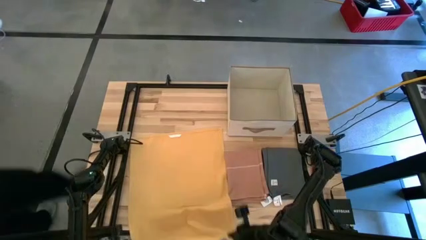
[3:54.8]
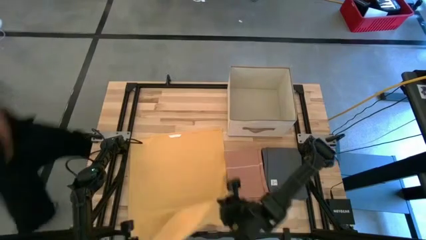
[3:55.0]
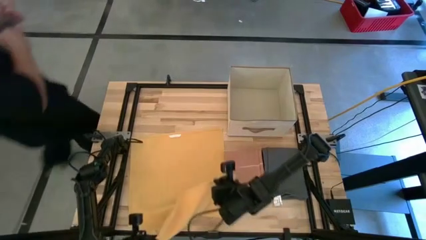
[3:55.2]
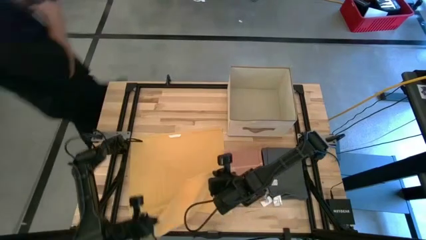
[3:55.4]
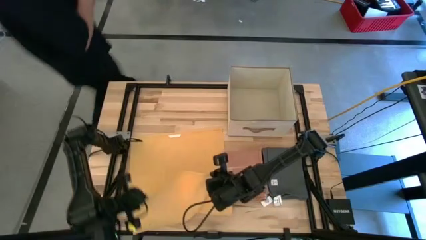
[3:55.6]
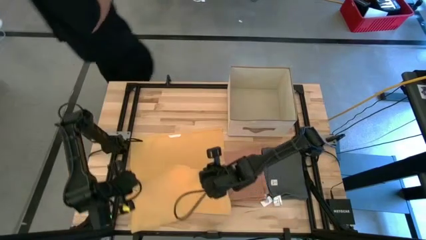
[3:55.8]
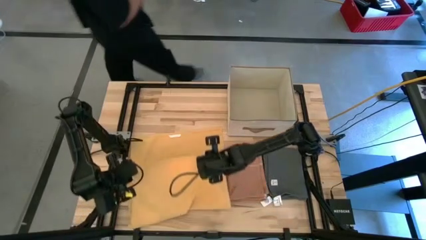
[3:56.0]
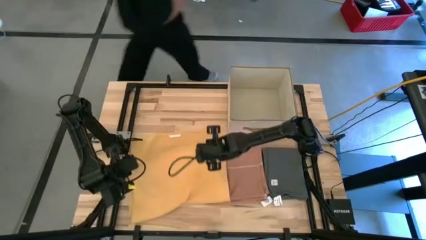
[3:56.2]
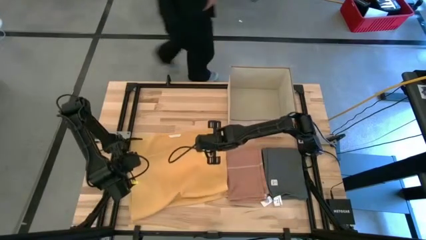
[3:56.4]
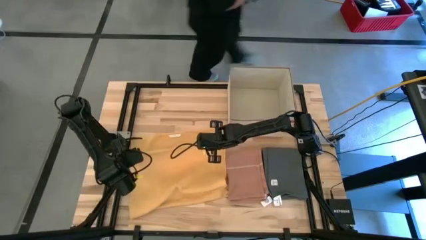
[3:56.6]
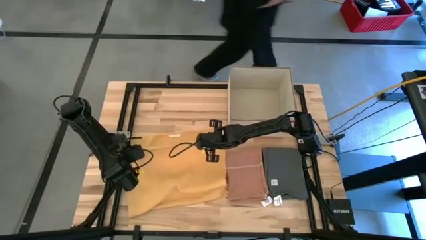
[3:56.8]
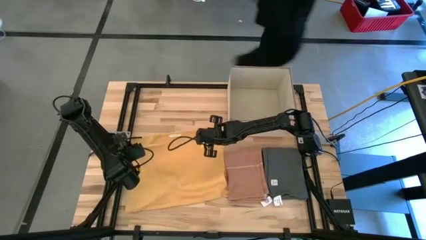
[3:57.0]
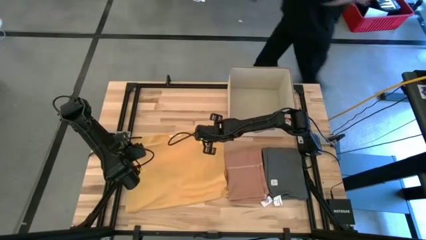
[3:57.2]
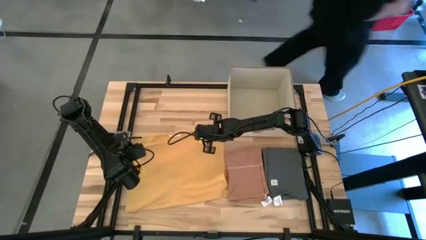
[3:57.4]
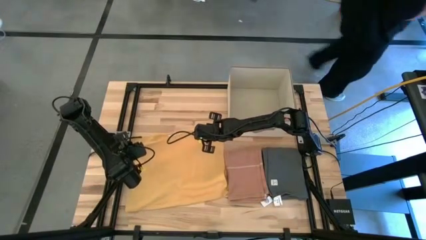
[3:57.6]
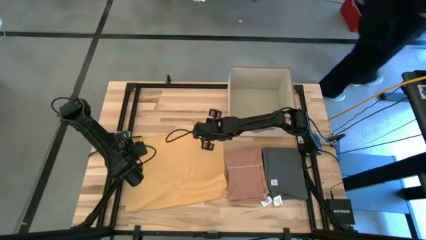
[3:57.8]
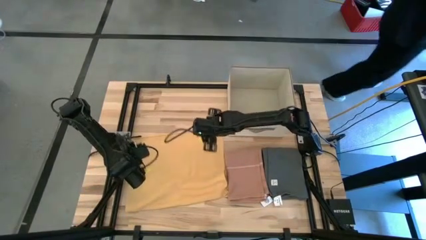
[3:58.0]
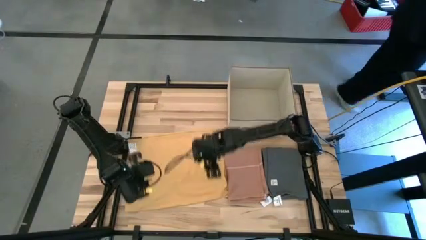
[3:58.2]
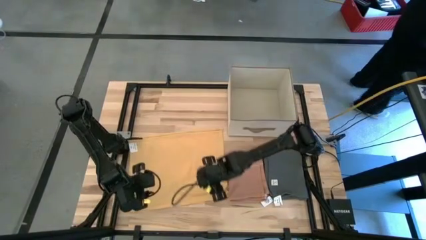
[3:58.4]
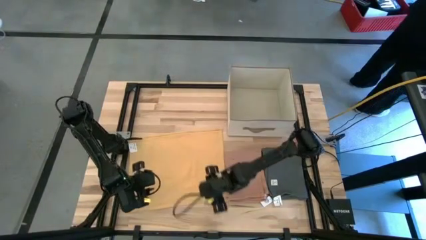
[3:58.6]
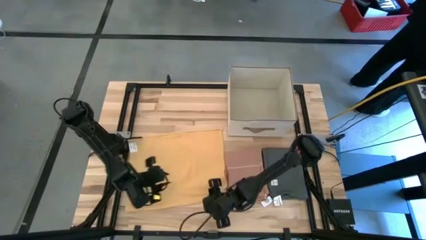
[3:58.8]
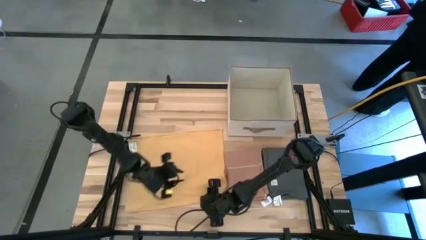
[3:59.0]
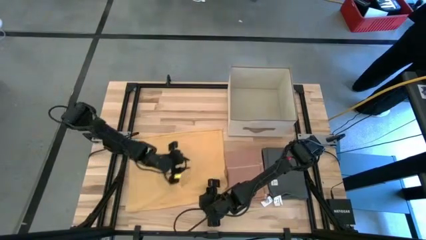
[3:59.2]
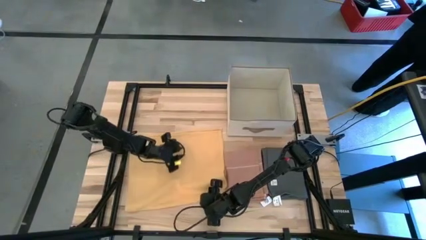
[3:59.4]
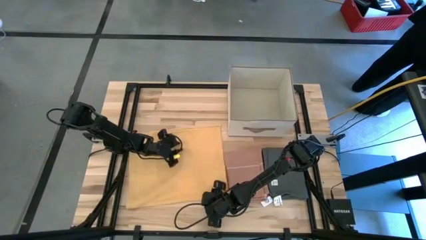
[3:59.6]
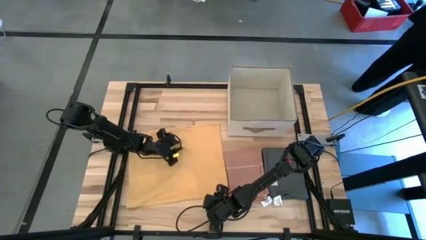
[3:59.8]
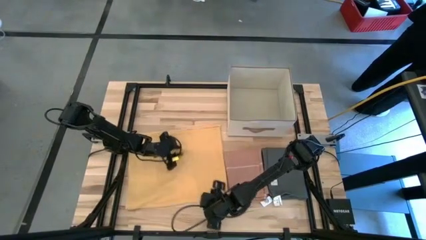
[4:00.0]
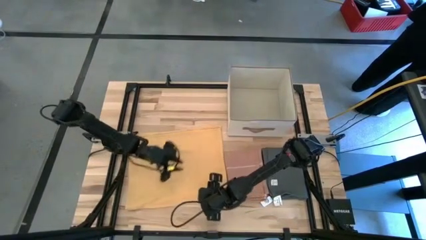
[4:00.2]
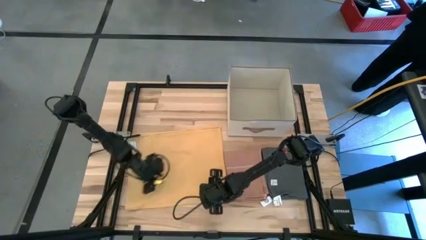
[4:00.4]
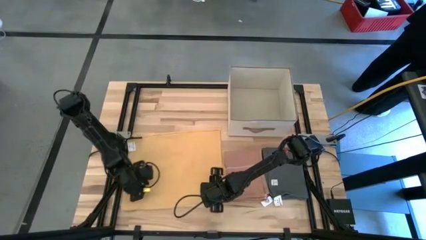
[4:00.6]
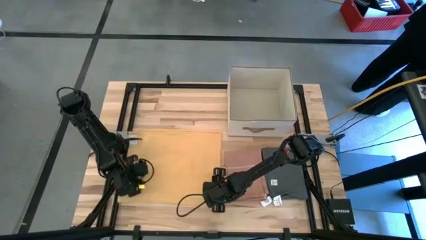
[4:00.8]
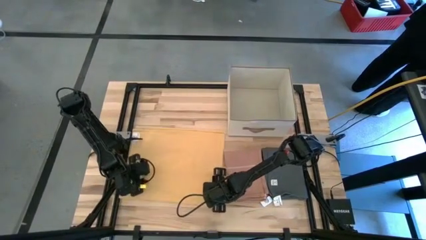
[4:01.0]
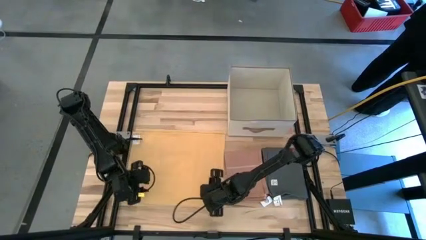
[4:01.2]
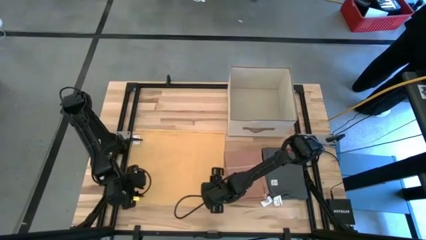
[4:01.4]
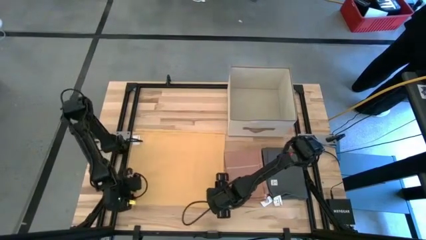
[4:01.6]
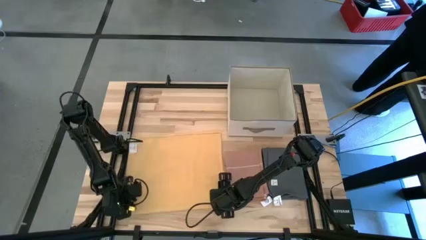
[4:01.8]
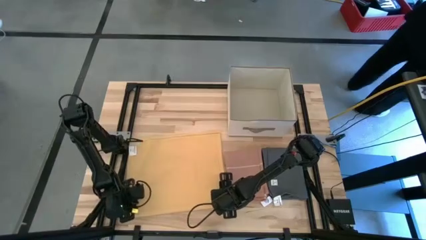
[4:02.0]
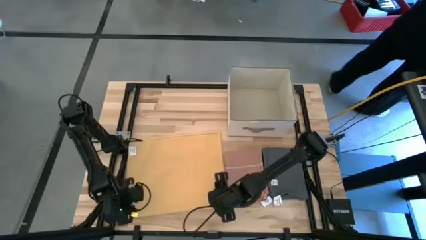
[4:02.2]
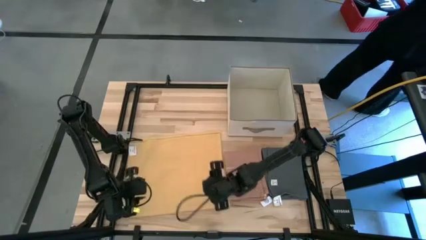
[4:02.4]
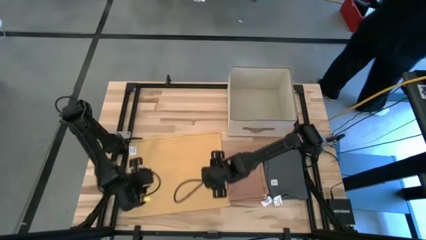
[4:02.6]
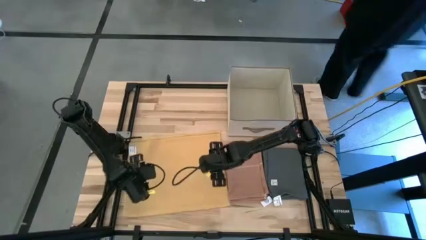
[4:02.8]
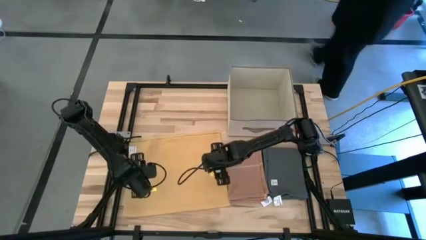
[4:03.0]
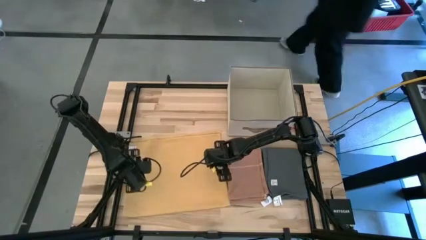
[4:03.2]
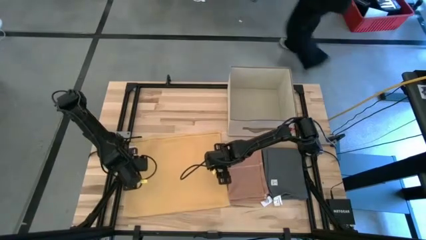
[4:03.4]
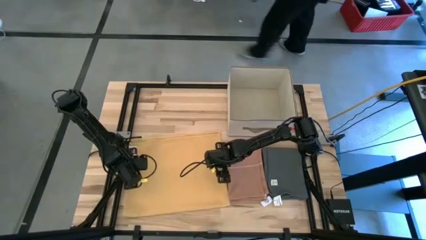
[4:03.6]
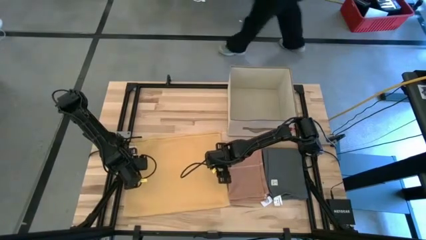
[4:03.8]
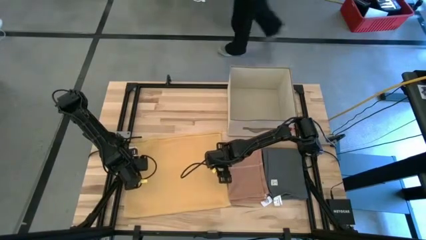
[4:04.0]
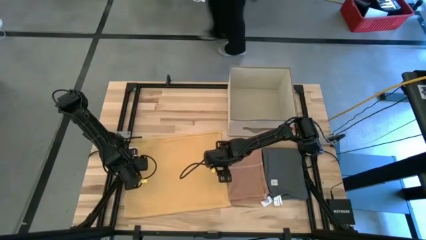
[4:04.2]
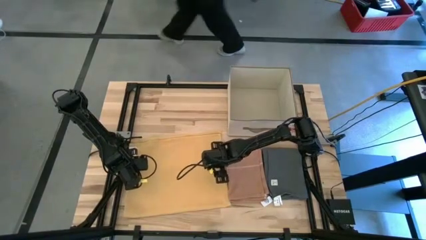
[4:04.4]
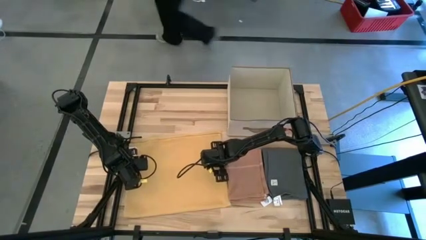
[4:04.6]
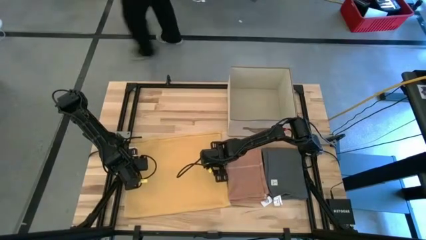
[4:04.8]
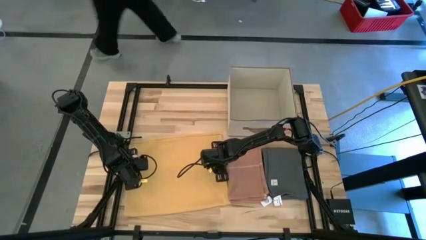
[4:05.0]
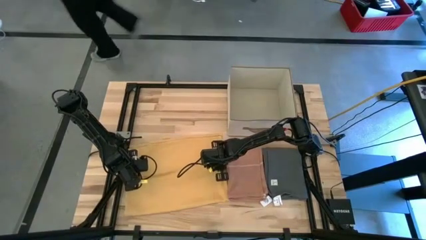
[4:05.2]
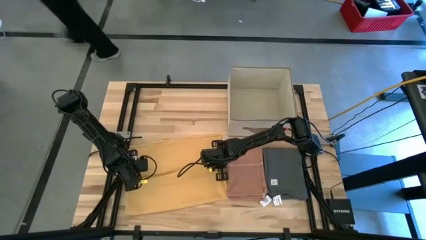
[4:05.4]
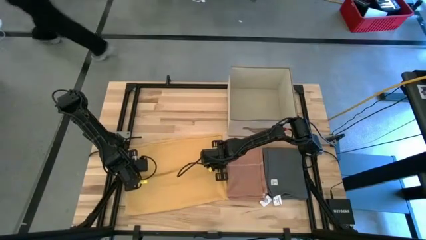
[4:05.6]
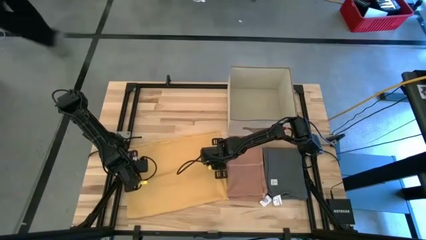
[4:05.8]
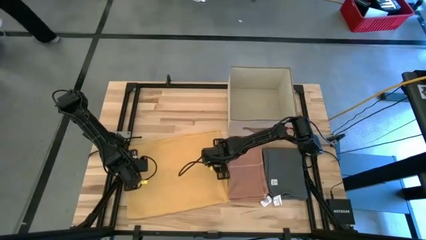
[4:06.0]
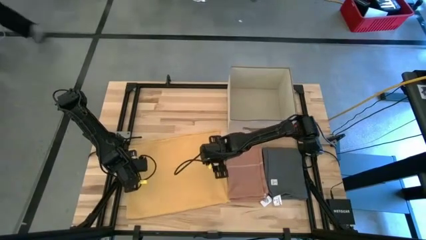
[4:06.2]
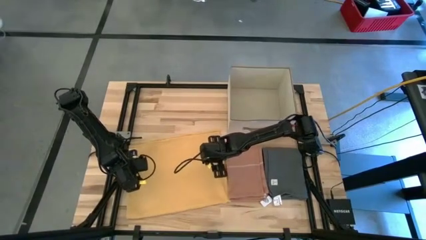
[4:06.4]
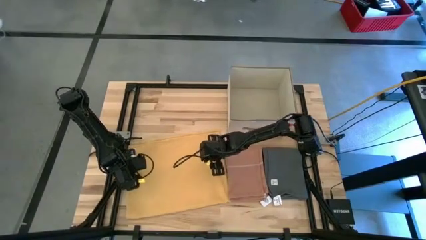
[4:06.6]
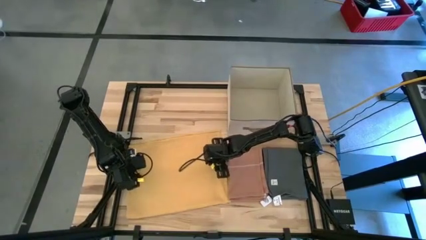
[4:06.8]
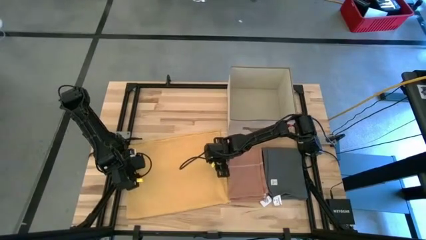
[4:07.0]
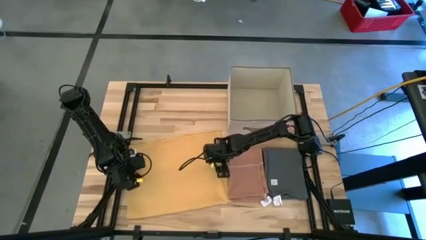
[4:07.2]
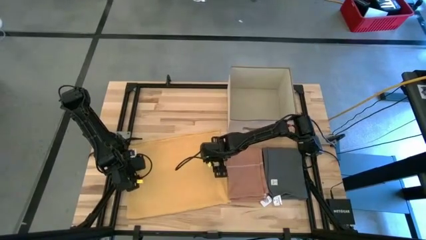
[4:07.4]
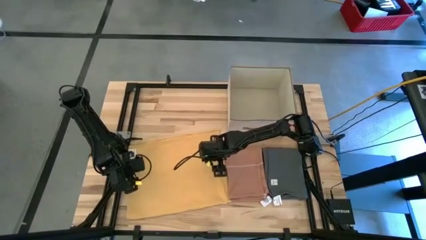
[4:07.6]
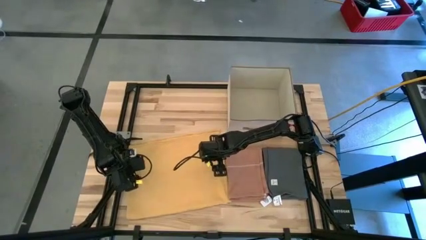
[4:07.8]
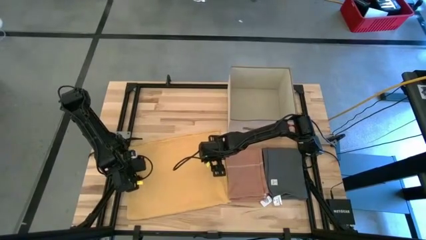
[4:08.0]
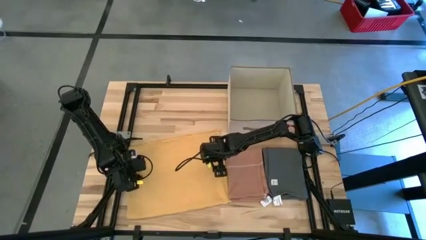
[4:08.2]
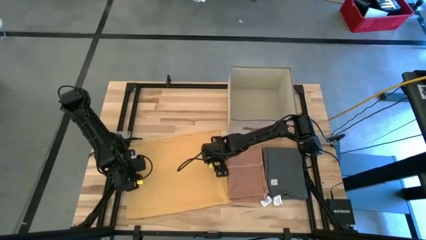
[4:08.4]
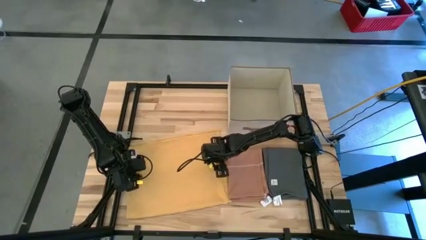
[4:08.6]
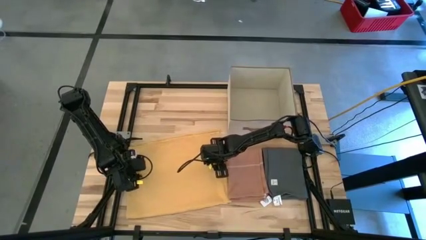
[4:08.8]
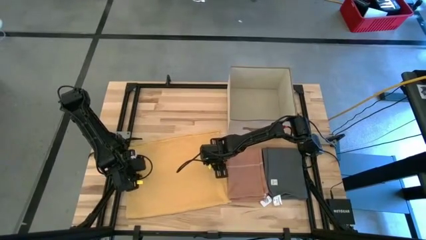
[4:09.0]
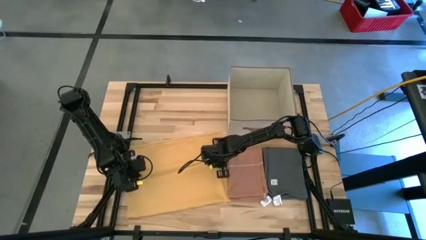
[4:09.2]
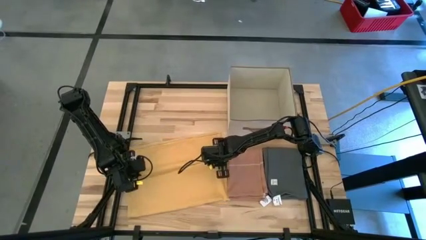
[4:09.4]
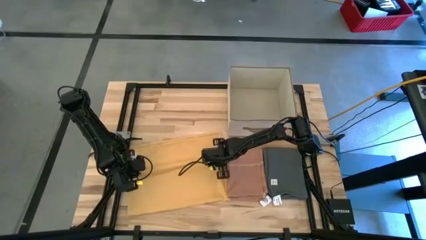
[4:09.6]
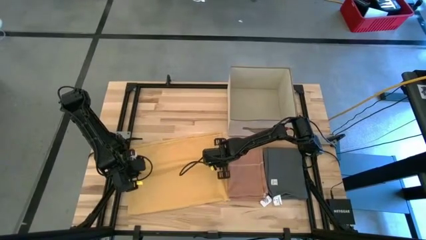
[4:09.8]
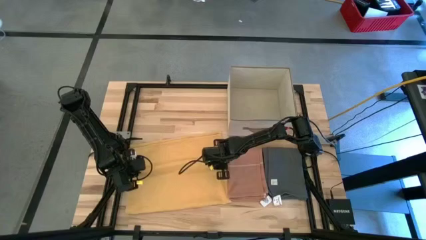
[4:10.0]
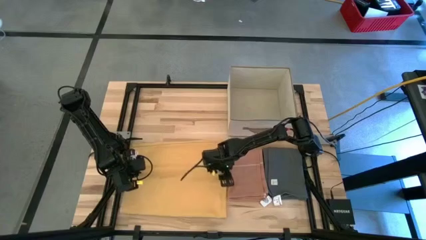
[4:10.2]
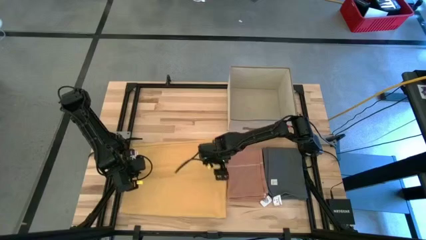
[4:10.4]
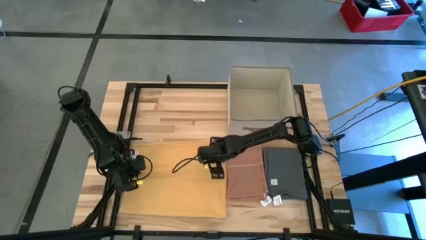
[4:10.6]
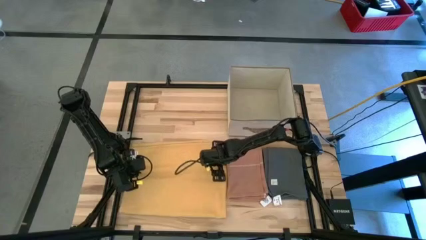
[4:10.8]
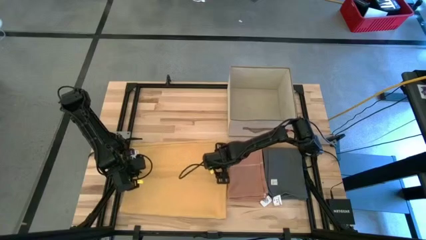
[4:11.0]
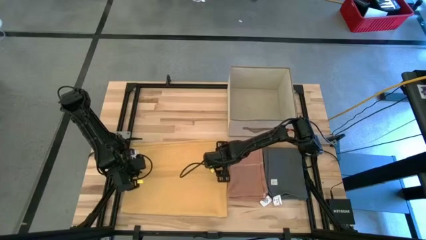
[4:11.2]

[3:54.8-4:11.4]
Task: Fold towel
Fold the yellow towel
